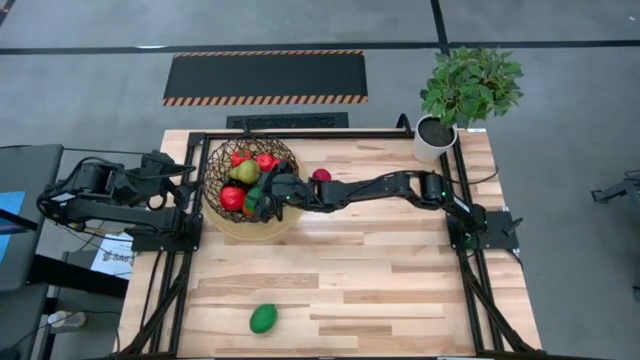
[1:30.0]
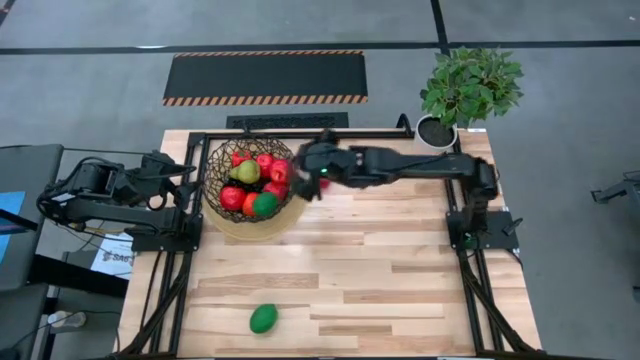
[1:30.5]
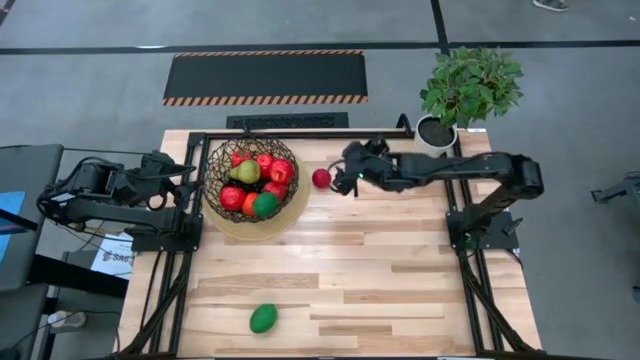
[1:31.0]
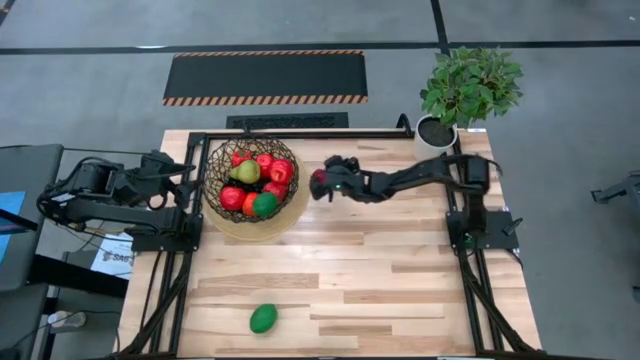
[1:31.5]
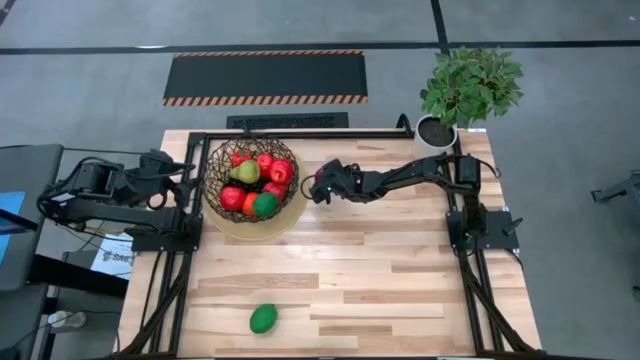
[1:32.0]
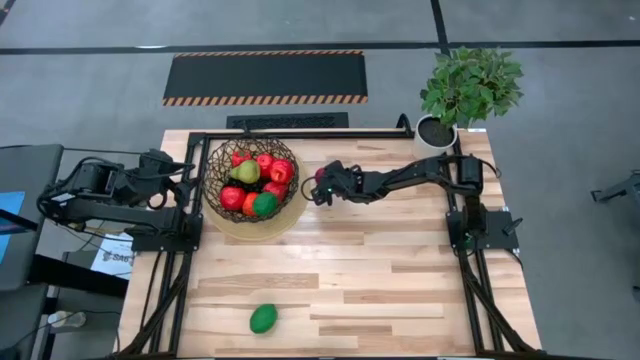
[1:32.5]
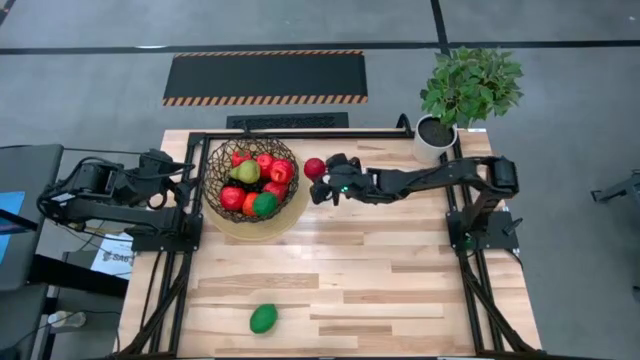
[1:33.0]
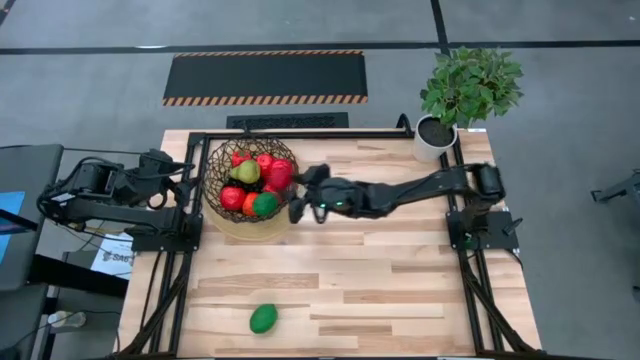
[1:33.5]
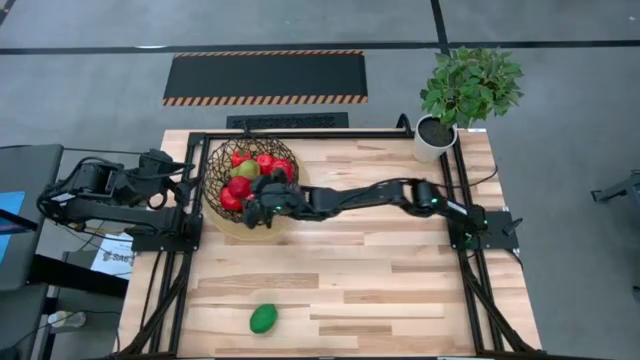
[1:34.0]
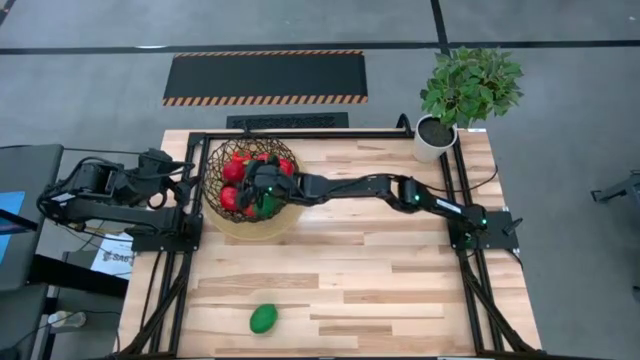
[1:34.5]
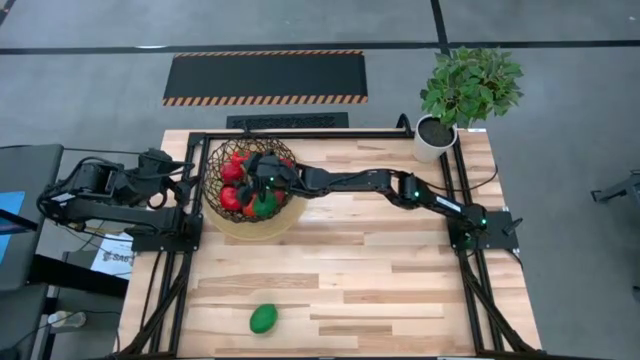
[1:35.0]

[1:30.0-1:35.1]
Task: Build produce basket
Put the red tomato into the black wire basket

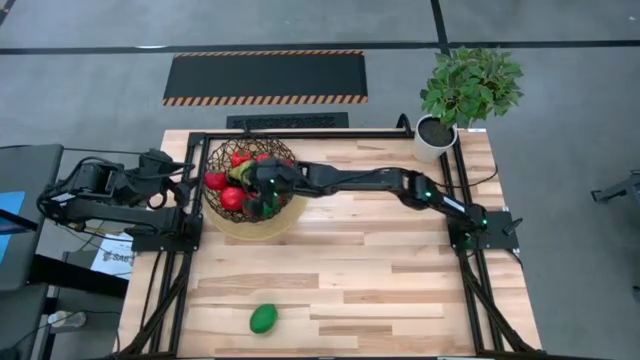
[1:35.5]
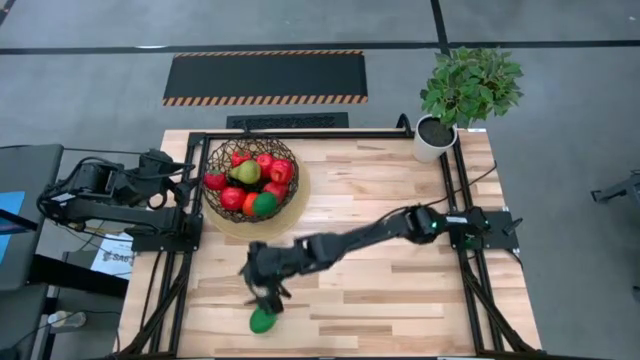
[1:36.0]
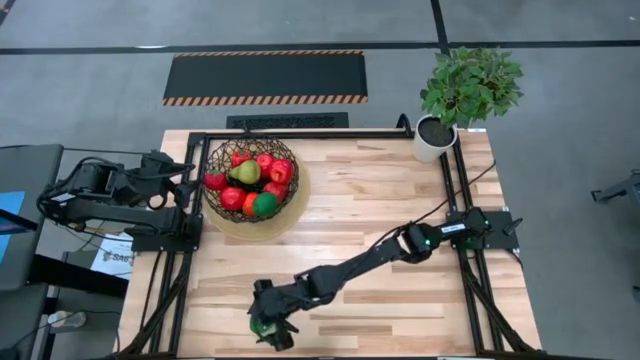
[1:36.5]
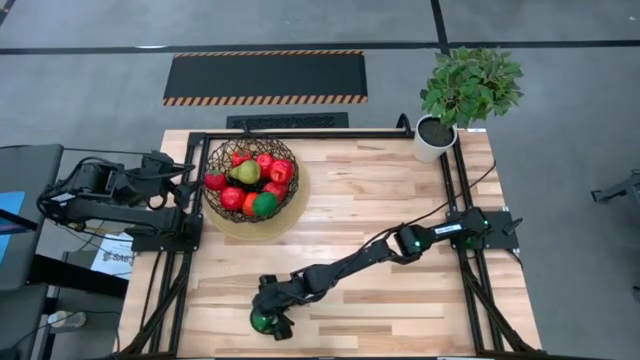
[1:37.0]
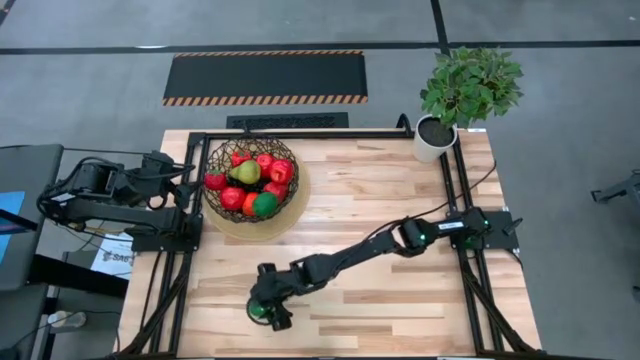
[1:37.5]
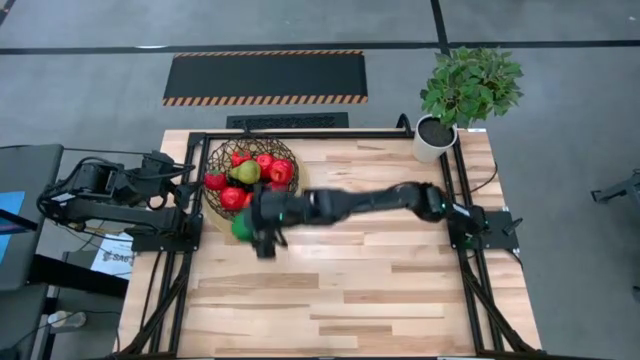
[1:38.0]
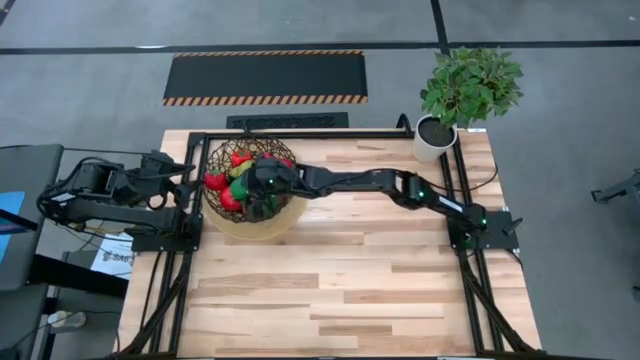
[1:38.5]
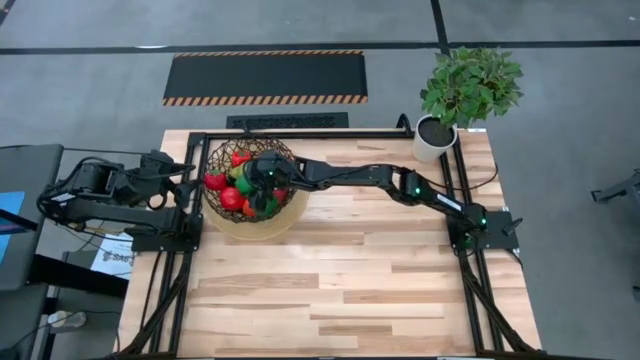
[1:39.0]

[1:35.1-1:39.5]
Put the green lime into the black wire basket

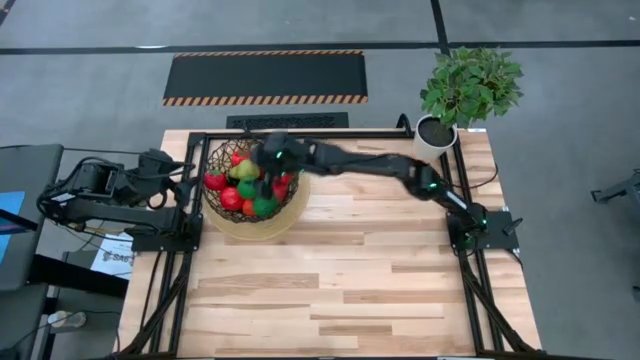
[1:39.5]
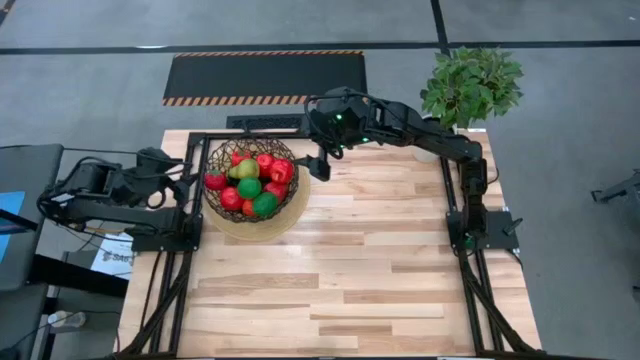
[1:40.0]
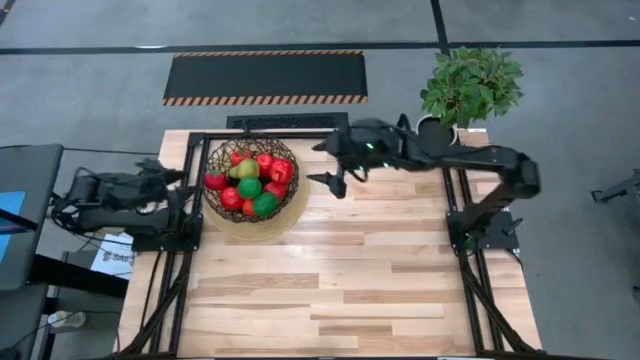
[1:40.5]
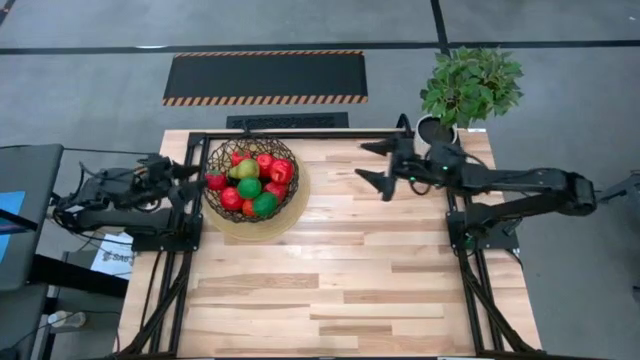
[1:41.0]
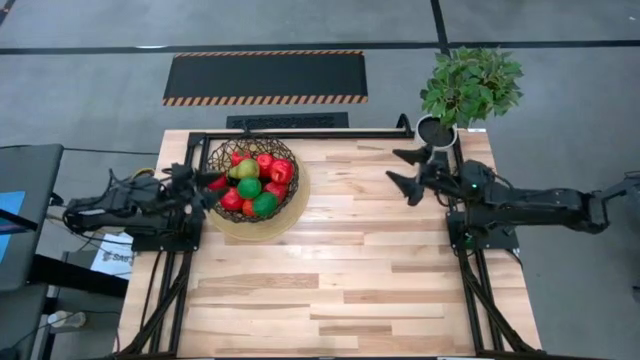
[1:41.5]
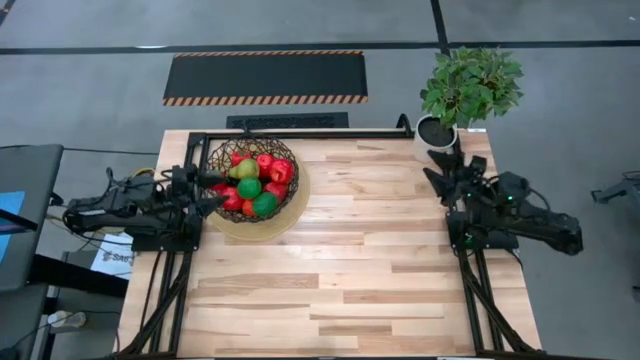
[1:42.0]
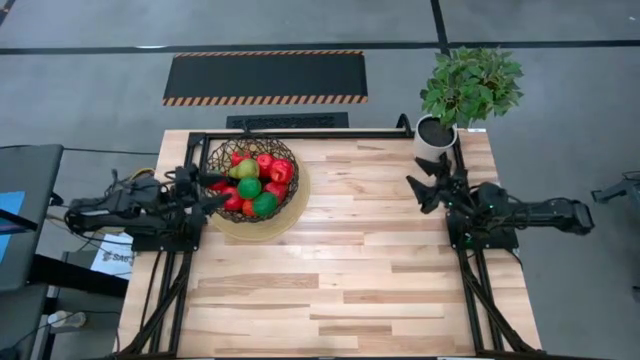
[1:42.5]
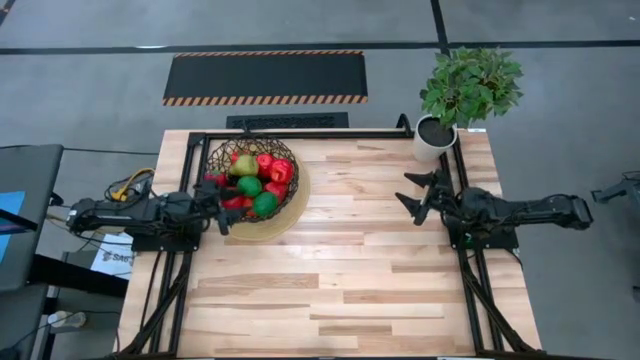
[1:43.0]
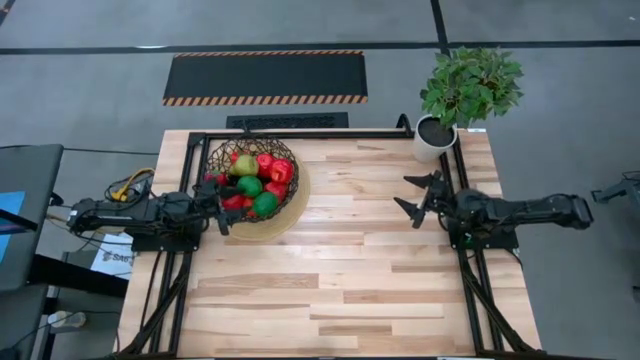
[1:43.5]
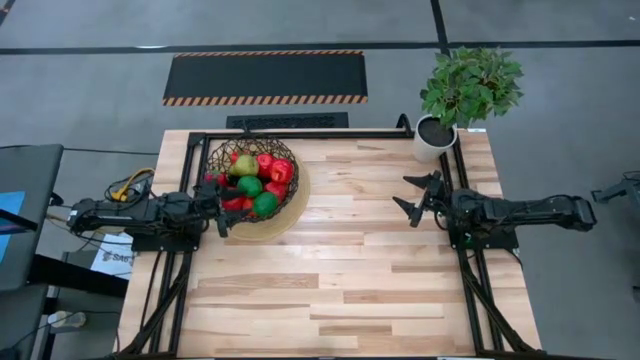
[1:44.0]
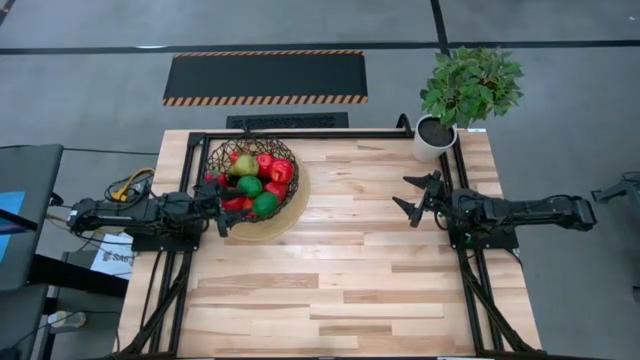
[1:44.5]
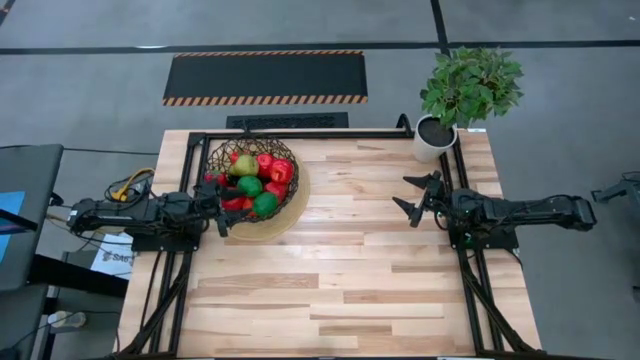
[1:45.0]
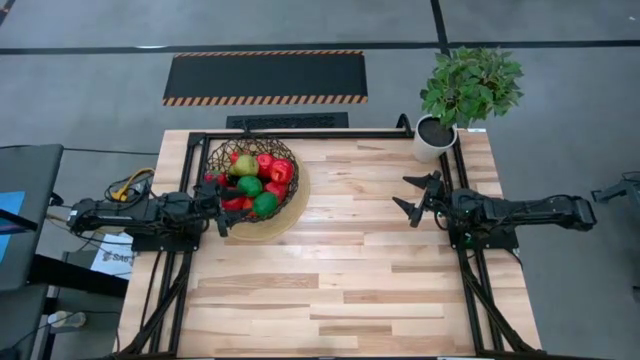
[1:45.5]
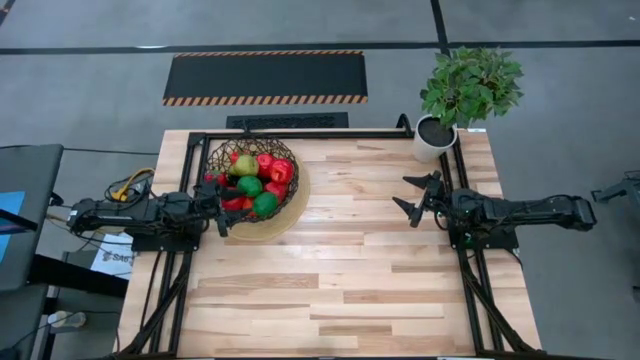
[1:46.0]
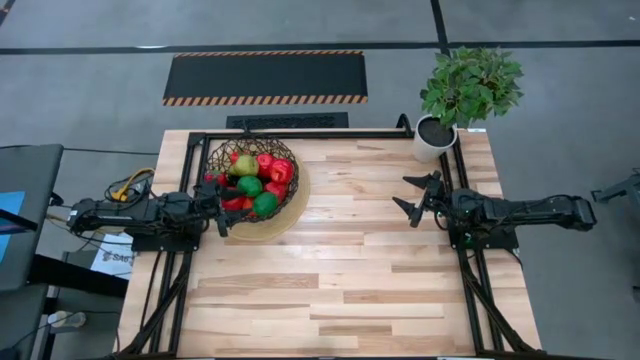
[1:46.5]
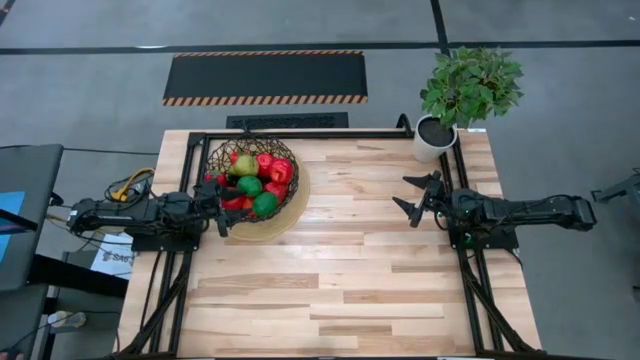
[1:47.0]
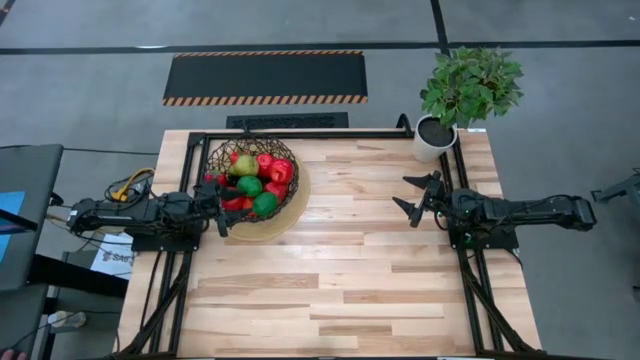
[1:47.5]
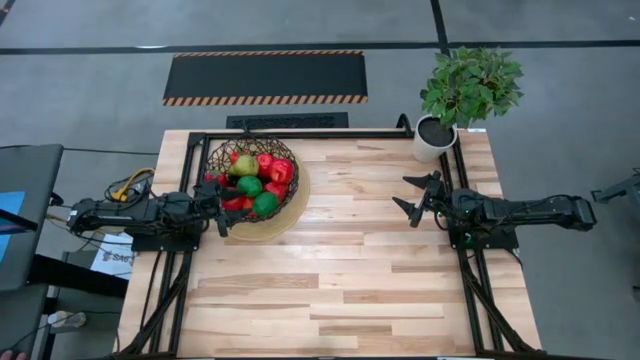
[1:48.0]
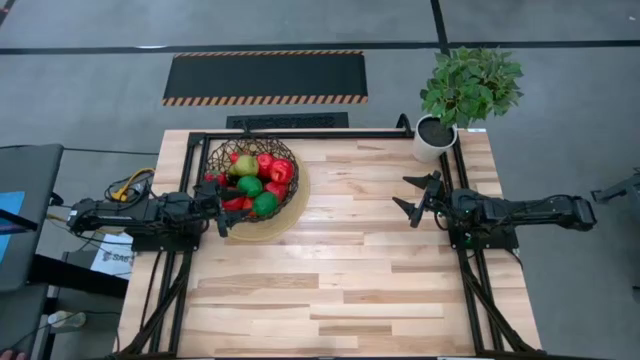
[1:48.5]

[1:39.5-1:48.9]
Return to Home Position

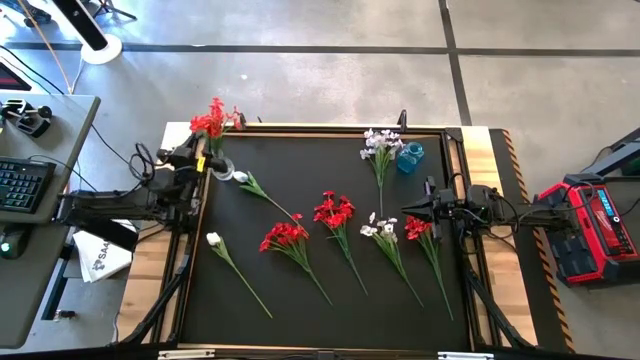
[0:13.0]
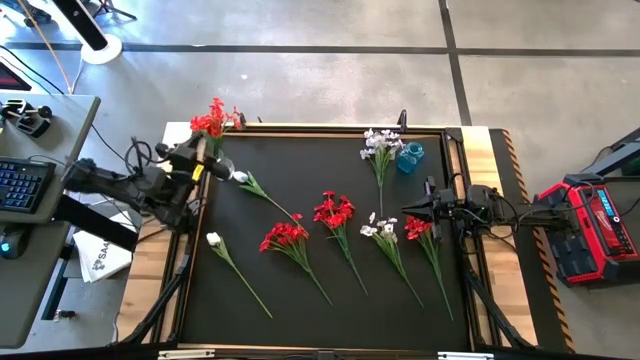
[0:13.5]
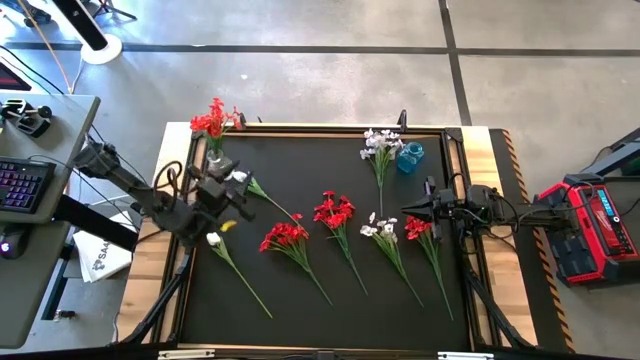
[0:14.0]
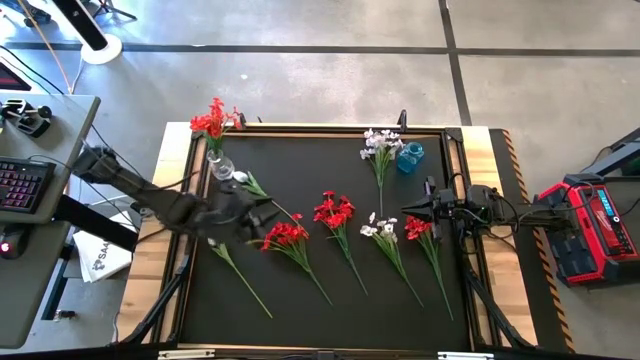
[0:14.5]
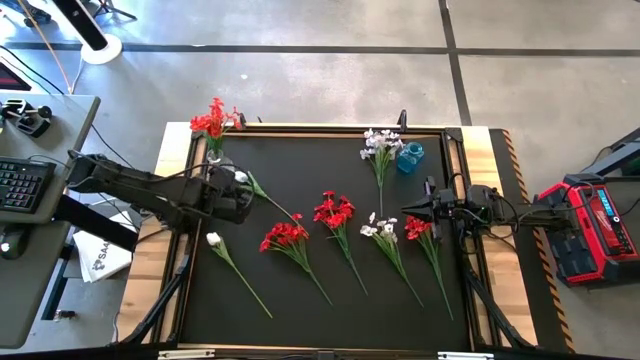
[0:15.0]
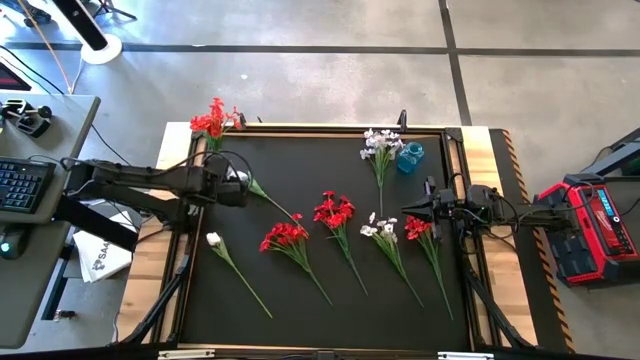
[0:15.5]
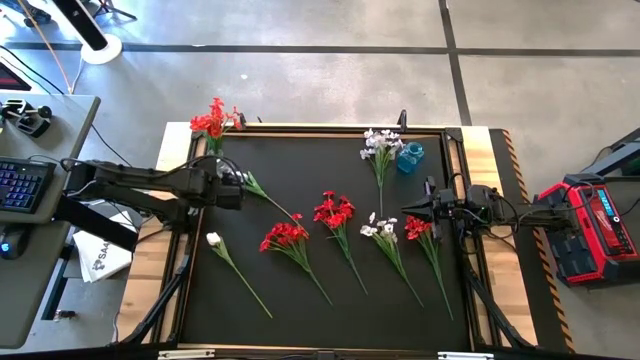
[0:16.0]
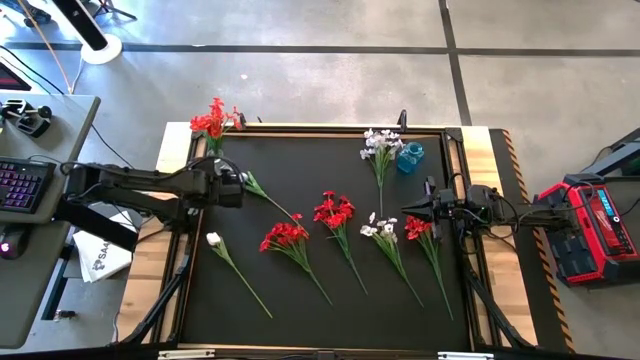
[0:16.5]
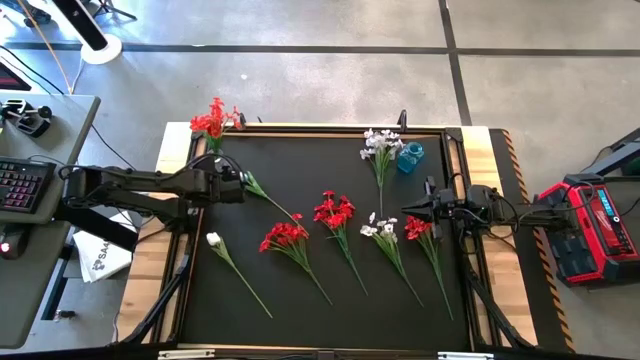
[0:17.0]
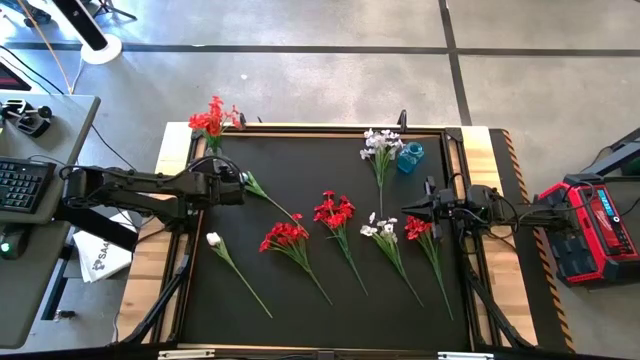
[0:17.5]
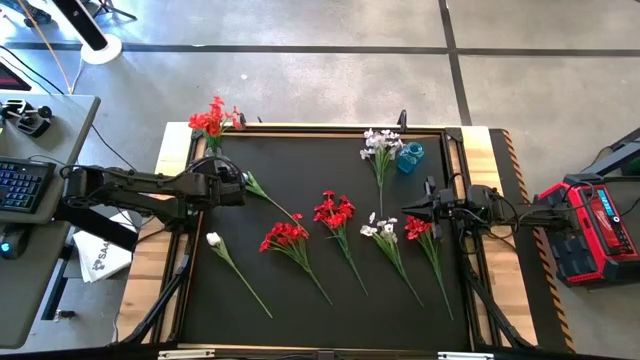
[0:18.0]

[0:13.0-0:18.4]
Task: Sort flowers into vase by color
Adjust the transparent vase
